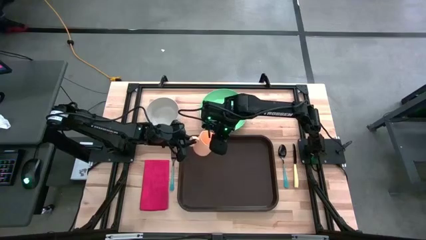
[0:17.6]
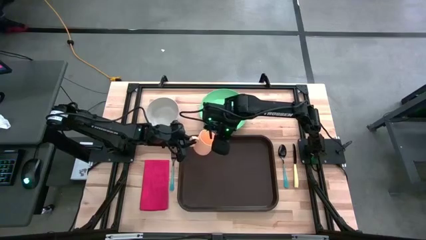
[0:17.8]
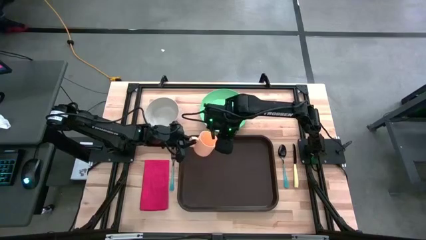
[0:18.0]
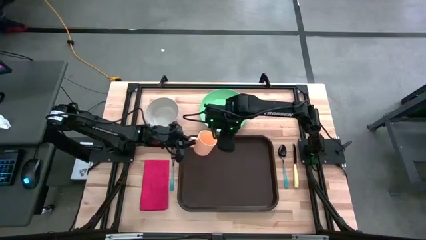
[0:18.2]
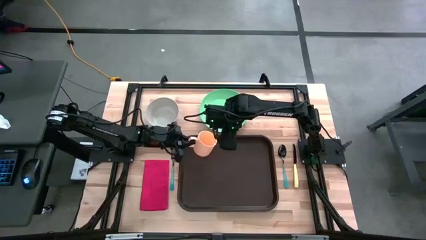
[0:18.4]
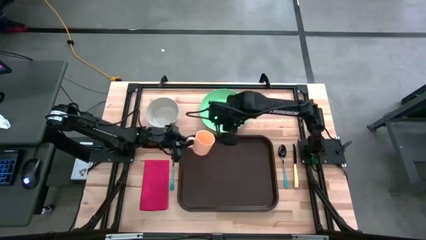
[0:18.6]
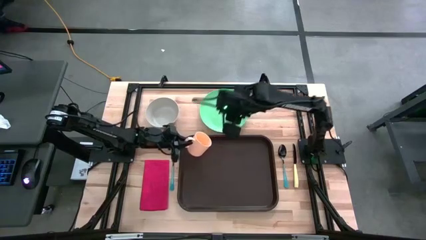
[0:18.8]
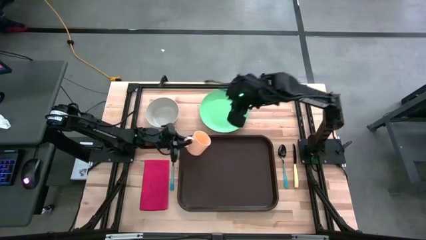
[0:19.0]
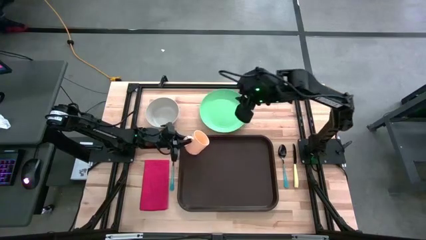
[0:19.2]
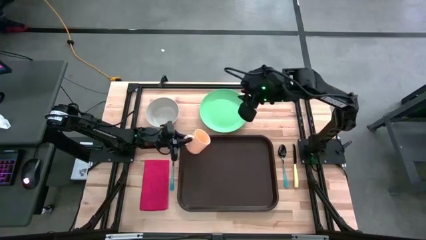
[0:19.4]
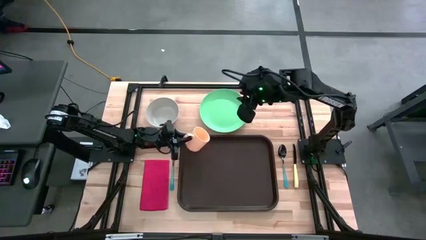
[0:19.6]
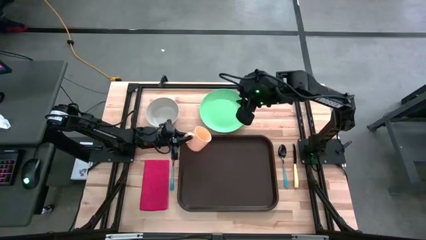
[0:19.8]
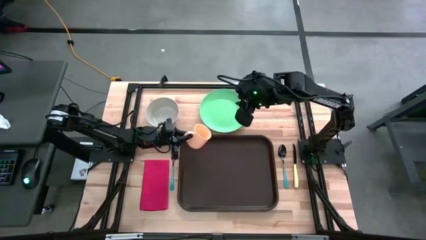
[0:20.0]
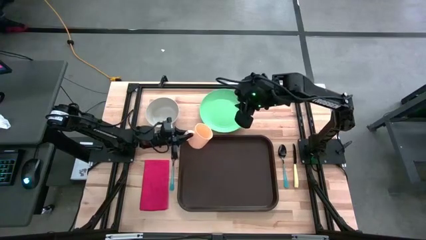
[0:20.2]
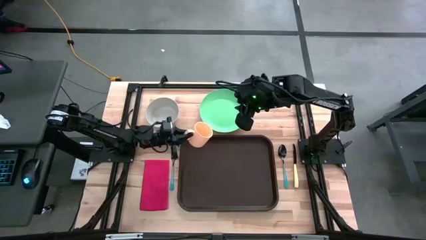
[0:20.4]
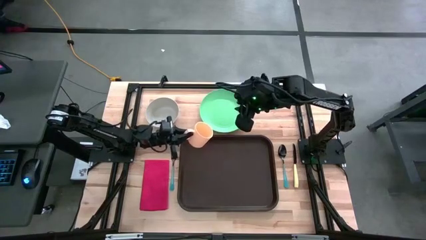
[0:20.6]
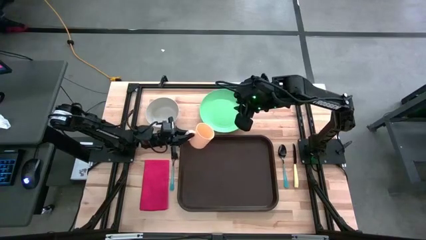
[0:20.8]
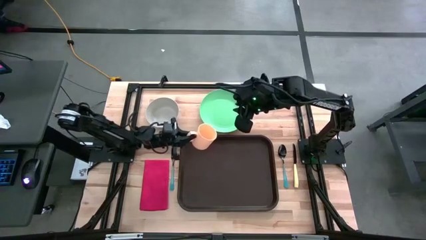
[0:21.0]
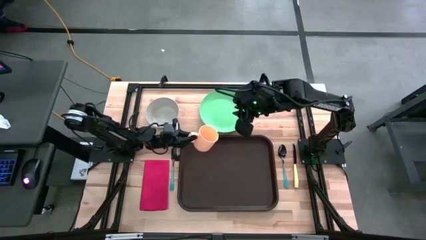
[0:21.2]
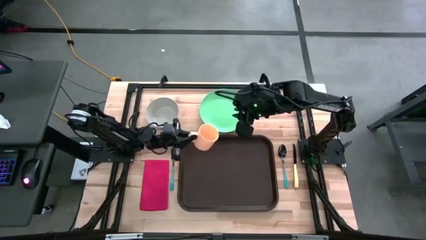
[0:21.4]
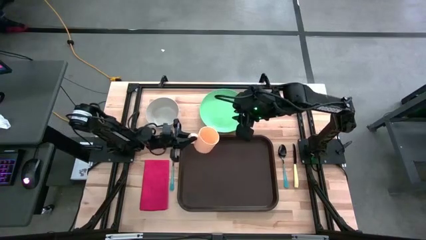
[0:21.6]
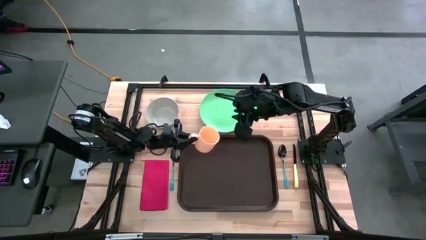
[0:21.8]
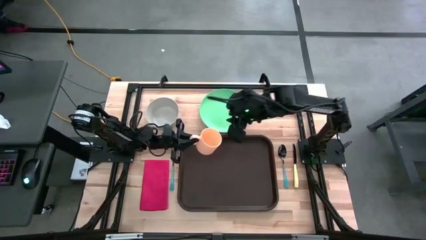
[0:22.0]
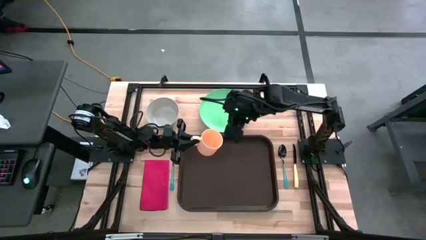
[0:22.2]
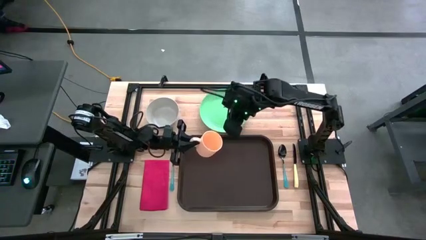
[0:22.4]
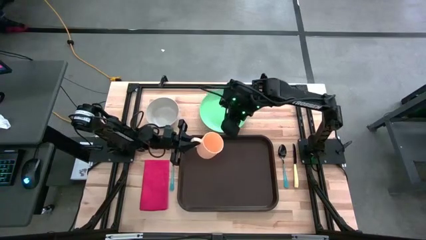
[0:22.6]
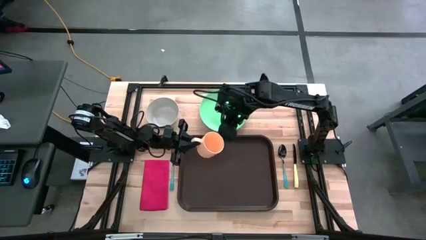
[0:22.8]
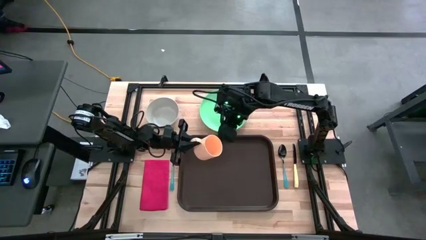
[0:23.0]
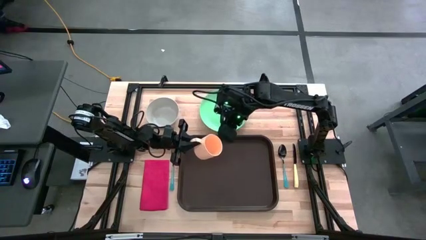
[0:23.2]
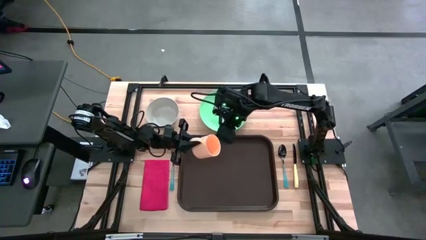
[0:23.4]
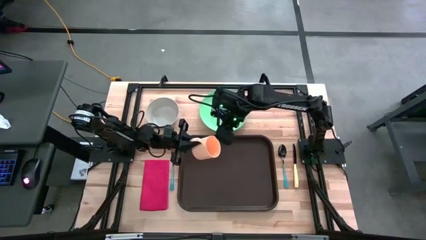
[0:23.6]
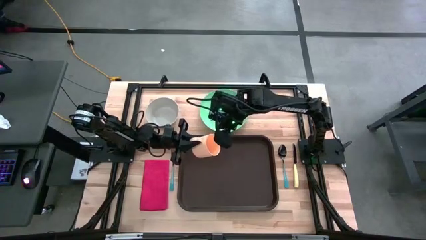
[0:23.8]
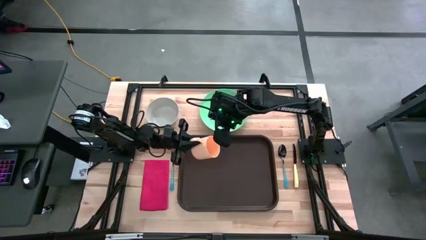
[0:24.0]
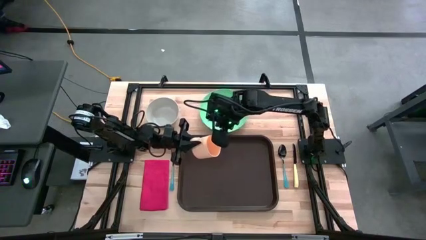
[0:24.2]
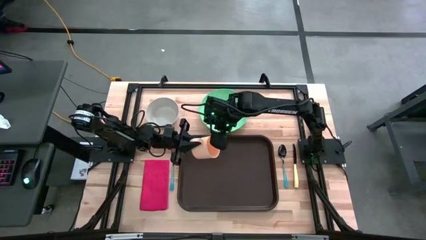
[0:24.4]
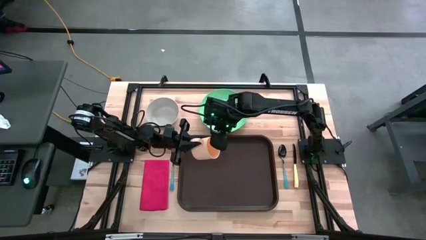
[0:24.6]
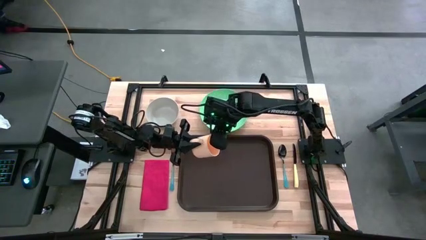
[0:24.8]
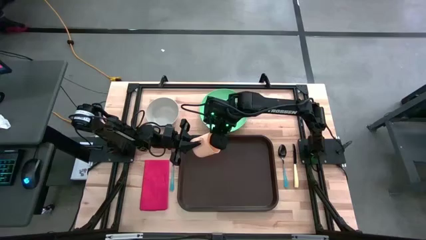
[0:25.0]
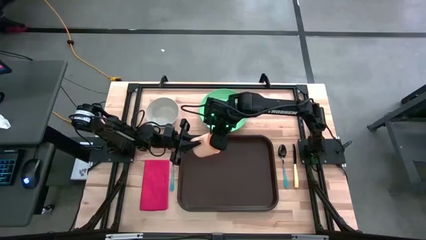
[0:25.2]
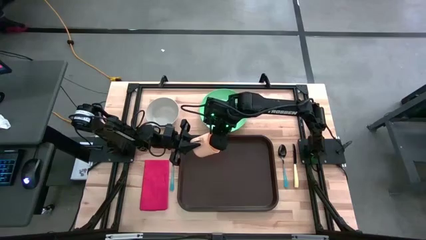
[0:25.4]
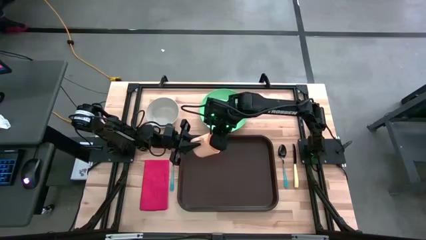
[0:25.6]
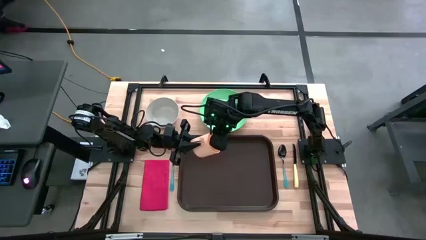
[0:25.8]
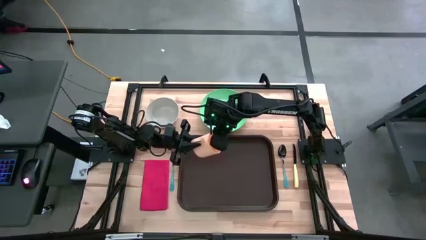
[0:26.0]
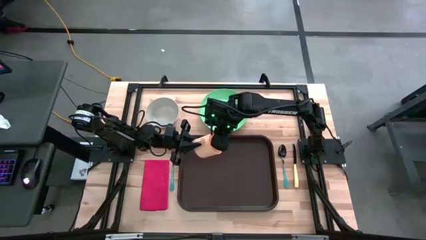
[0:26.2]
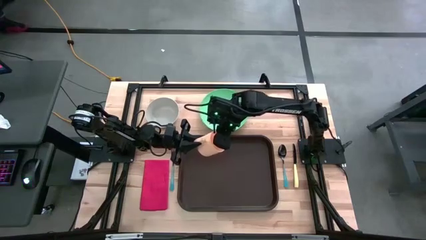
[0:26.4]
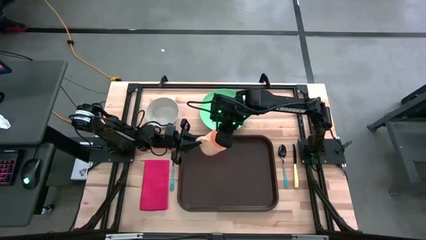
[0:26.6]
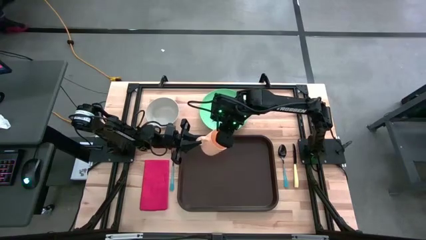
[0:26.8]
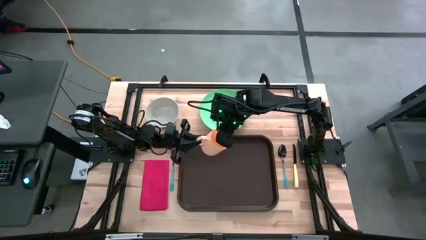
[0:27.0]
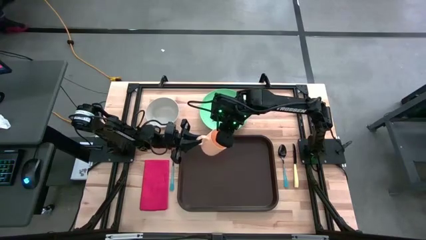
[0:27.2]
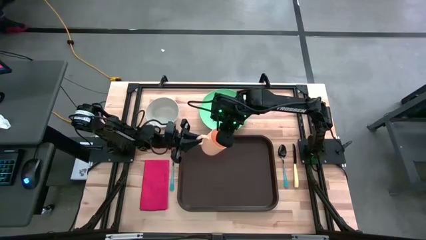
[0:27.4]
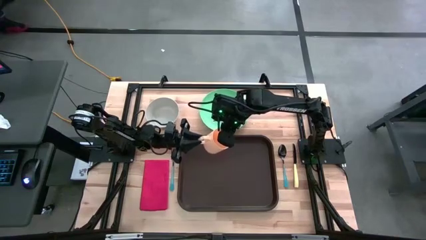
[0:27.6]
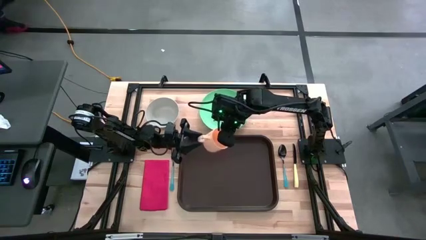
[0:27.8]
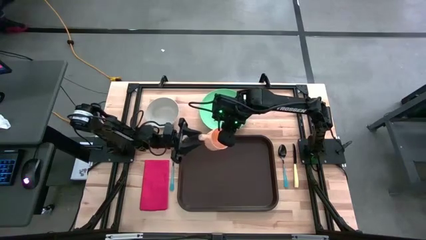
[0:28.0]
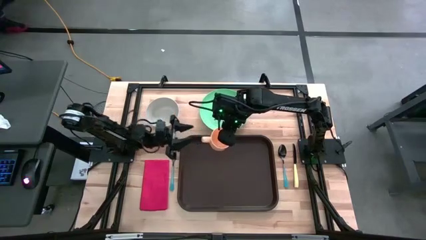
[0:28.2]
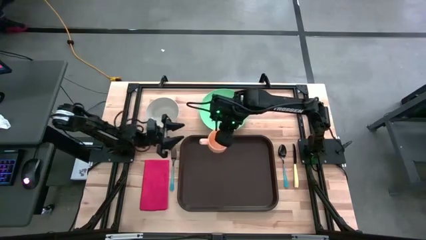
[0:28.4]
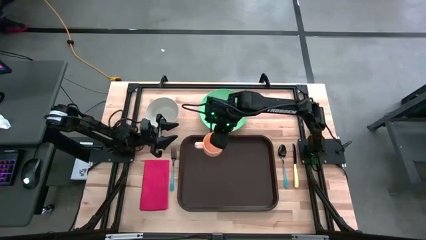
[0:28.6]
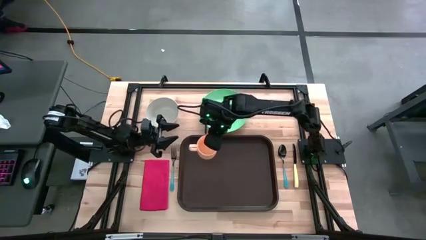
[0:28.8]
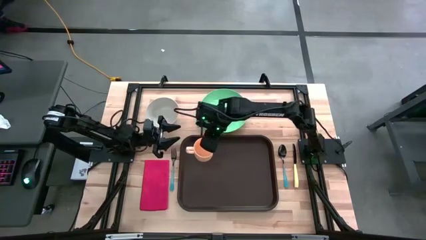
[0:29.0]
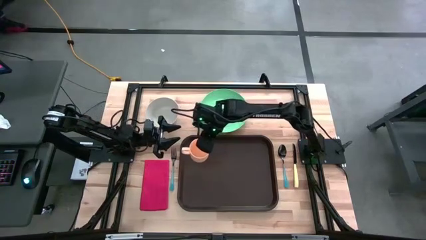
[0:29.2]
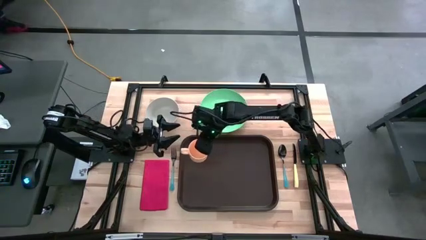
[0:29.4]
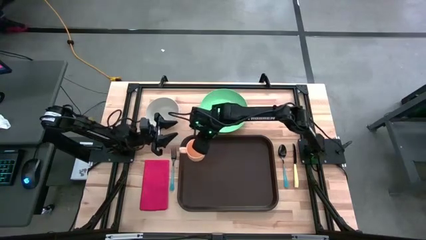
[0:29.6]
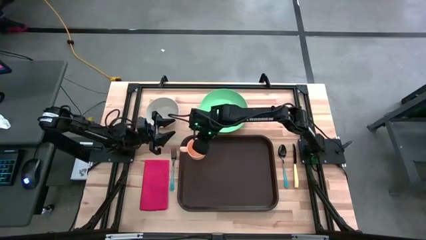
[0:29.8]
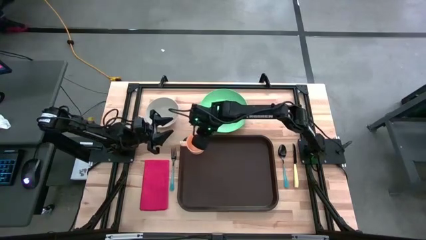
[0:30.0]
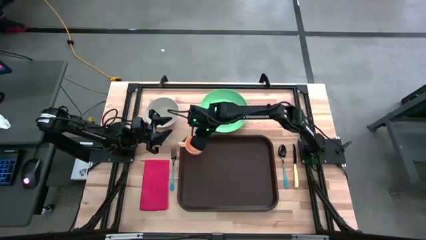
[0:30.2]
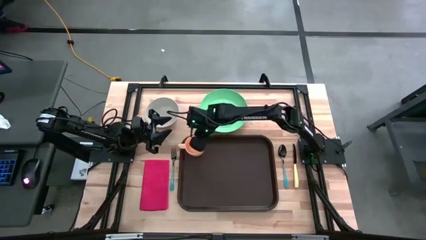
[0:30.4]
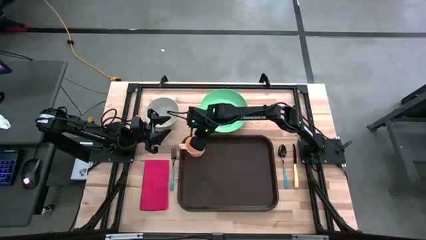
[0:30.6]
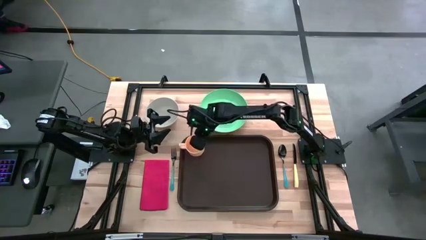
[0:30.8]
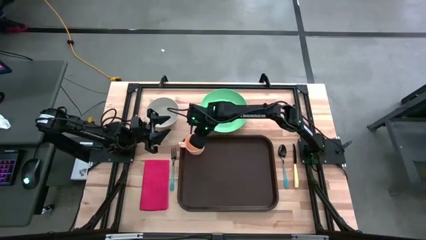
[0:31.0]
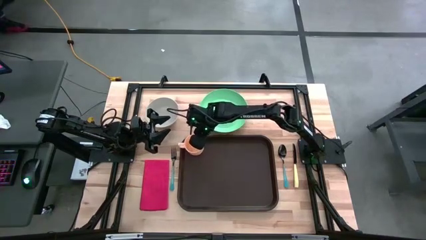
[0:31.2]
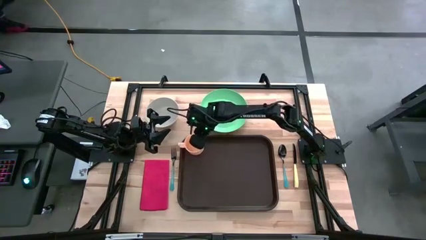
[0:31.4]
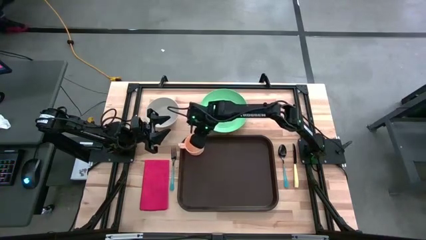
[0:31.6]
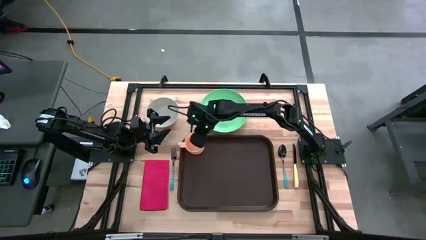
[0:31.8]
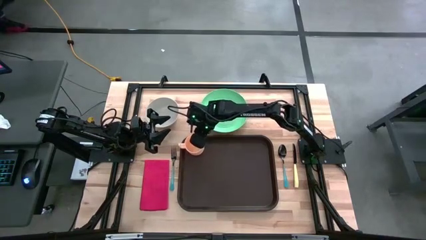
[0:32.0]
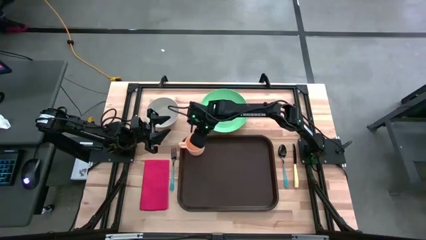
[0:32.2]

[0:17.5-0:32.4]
Task: Set up tray
Put the white cup on the brown serving tray
